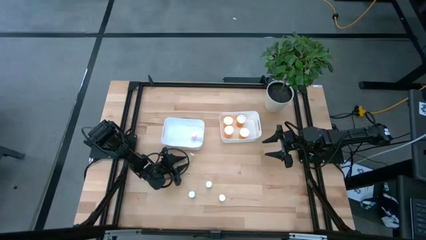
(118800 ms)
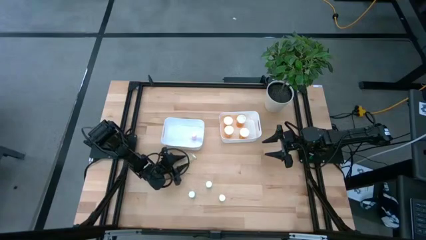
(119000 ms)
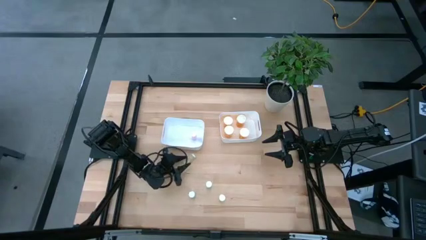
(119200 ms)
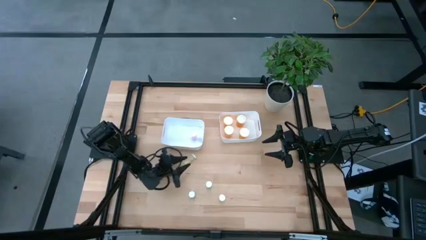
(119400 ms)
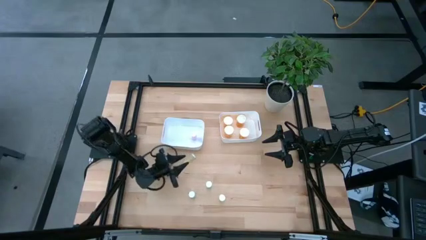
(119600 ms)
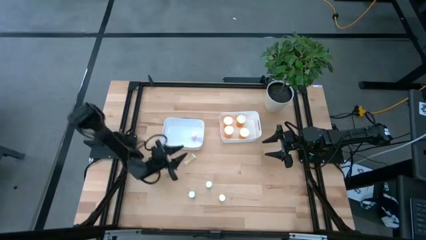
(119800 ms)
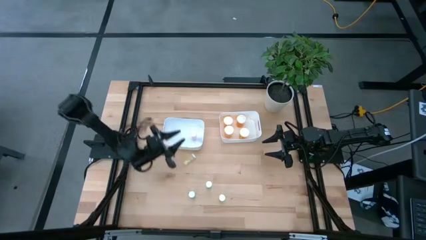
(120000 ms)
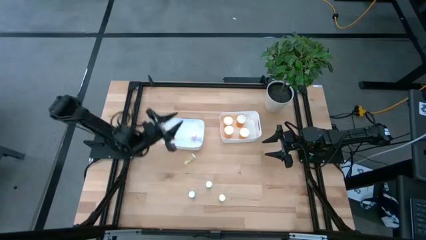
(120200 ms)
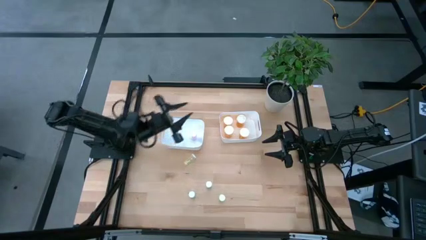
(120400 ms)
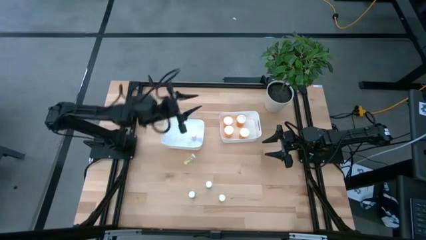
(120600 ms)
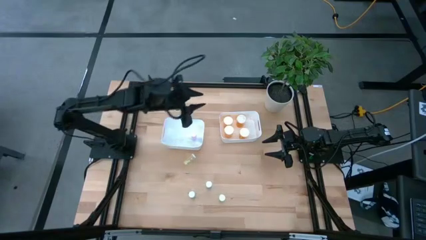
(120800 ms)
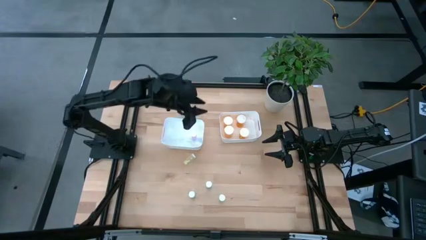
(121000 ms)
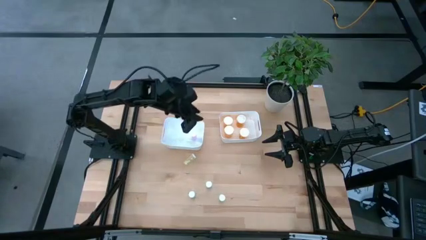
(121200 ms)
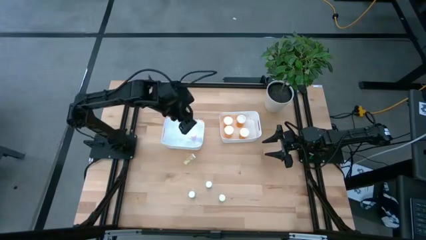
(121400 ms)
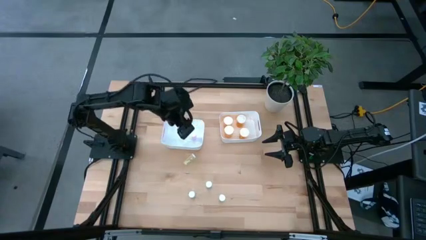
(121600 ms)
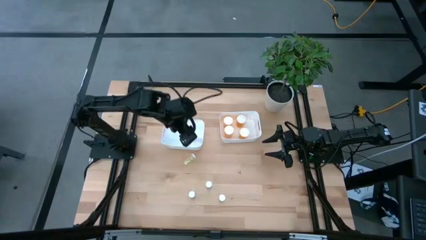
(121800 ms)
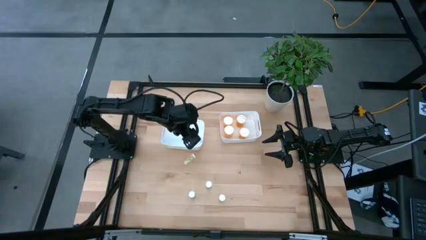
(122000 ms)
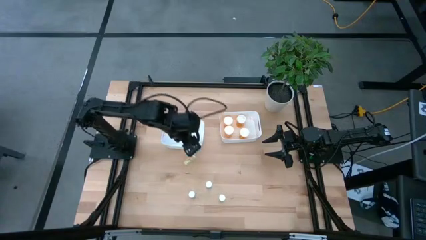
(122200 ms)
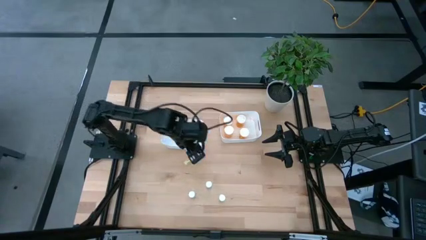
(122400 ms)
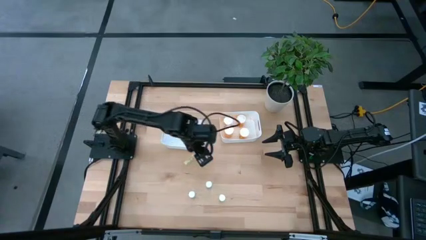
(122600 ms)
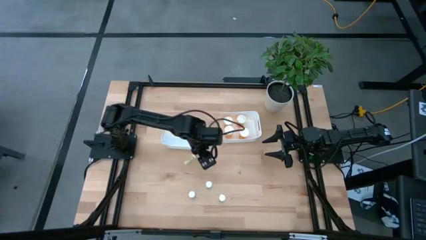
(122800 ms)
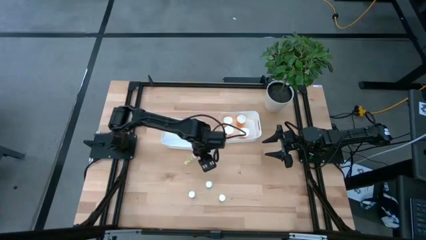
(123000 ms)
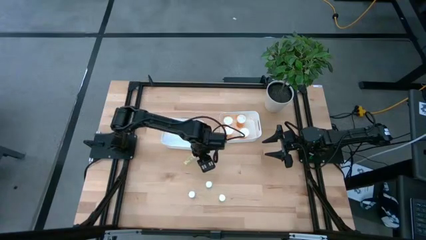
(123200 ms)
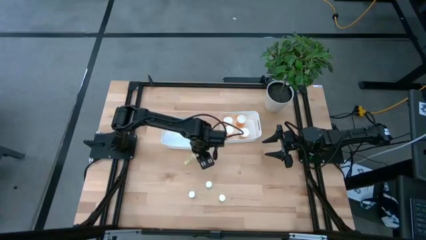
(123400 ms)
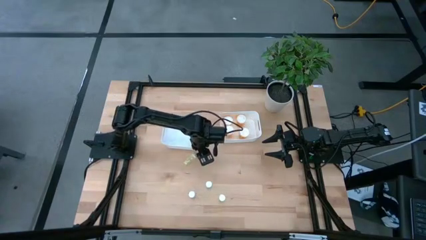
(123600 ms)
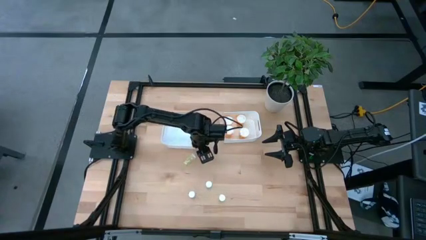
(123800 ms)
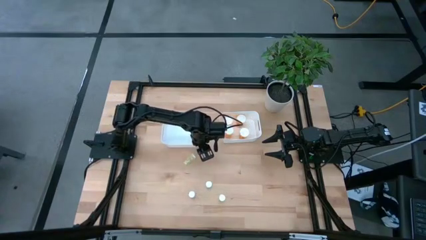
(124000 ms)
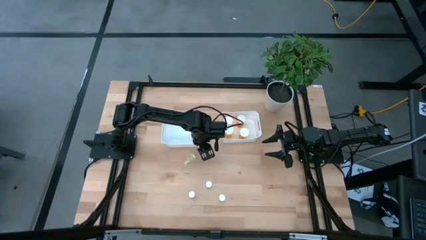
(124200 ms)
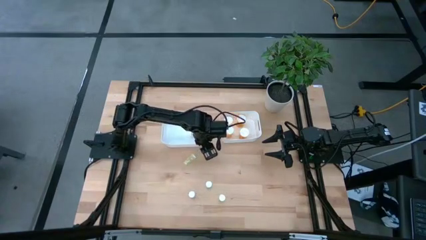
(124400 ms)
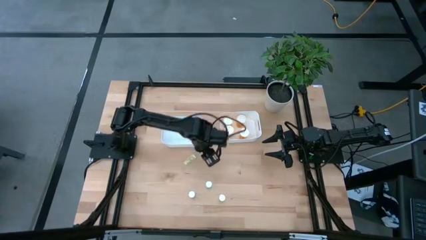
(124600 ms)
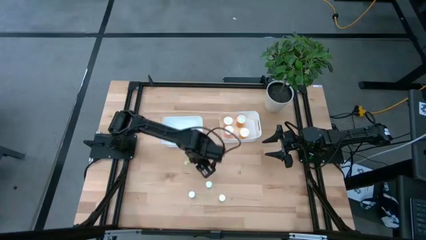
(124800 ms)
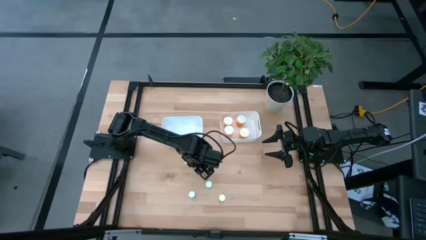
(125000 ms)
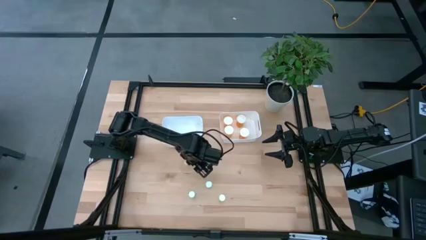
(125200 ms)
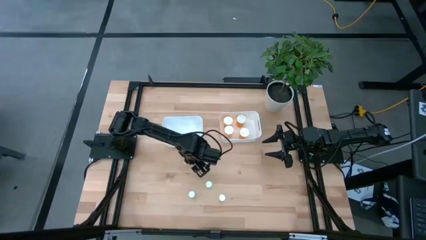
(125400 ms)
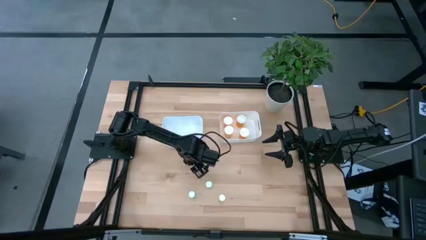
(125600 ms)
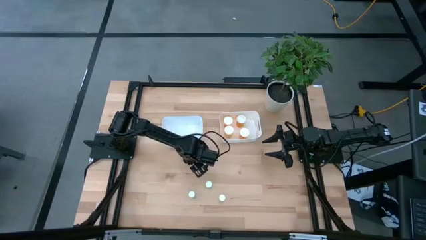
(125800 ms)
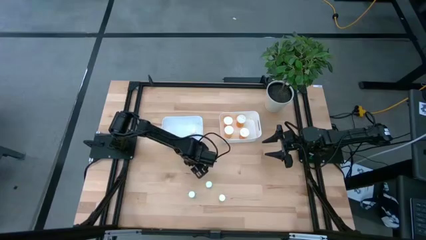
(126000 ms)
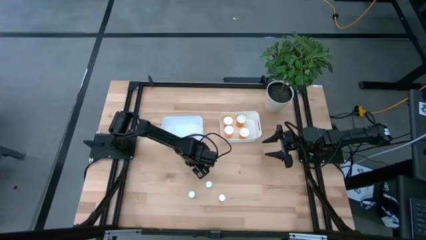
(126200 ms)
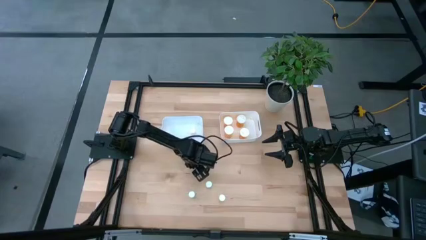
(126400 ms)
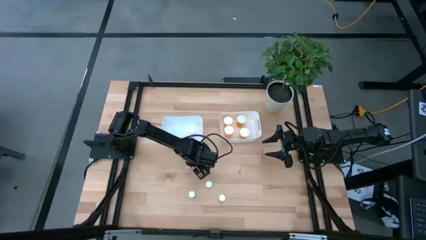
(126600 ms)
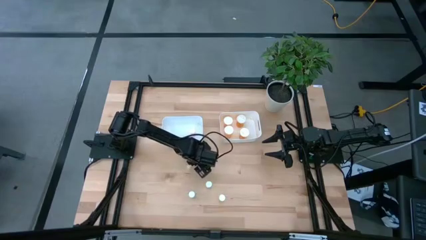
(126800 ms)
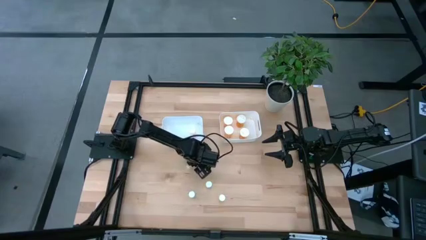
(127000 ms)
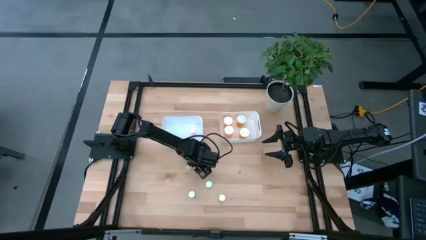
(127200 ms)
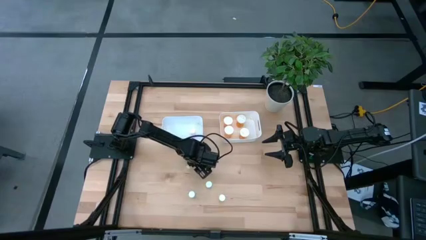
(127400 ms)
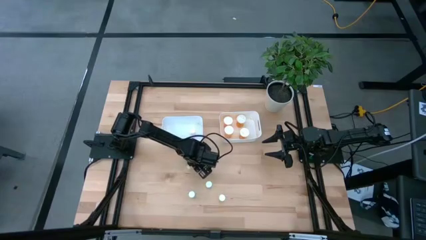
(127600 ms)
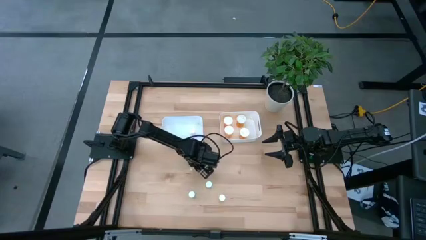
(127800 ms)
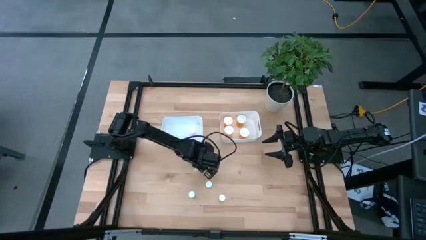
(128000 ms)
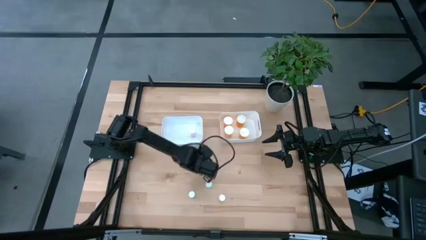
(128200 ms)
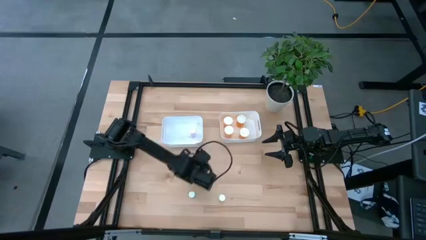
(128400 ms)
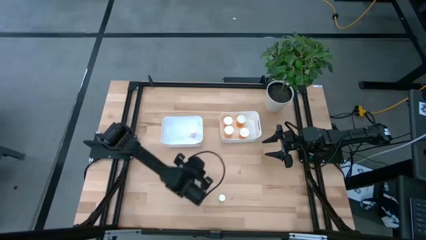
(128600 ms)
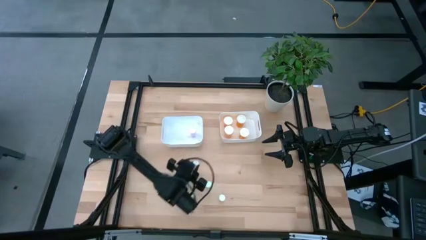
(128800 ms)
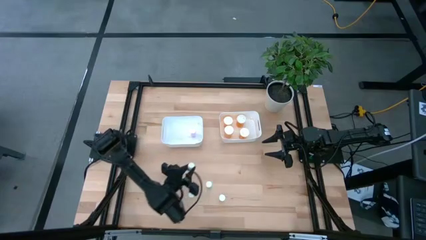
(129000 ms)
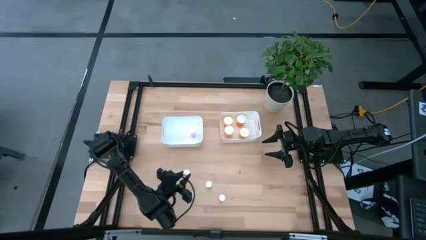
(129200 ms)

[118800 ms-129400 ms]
Task: Pick and place medicine bottles into bin by pill shape (circle, oval)
Put the top yellow pill bottle into the left white bin

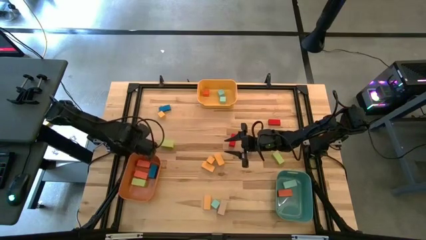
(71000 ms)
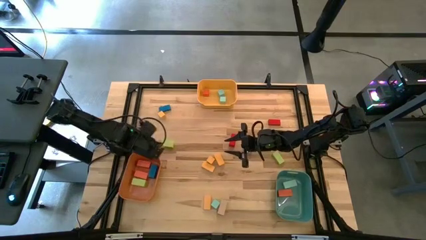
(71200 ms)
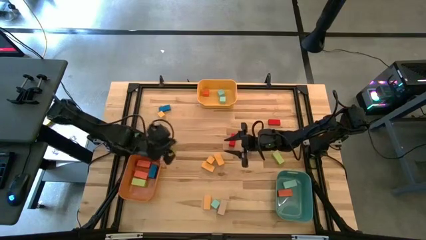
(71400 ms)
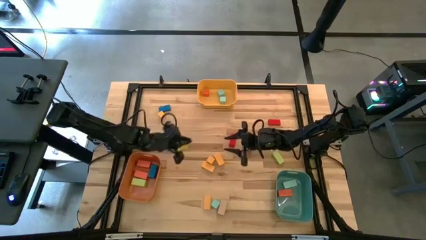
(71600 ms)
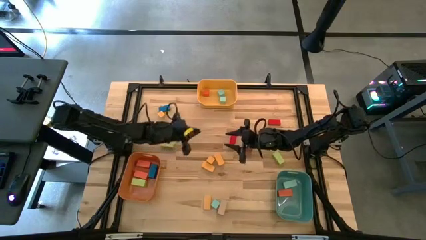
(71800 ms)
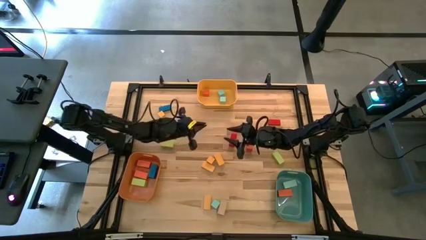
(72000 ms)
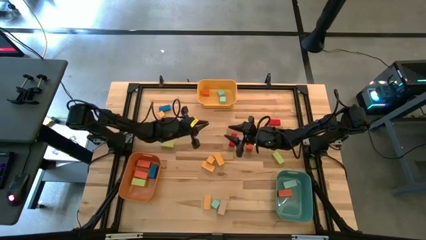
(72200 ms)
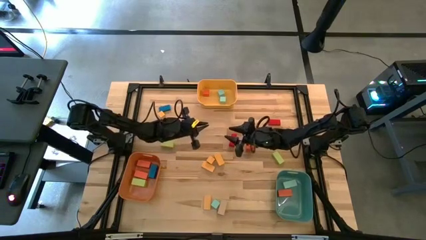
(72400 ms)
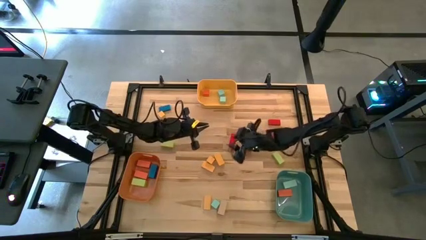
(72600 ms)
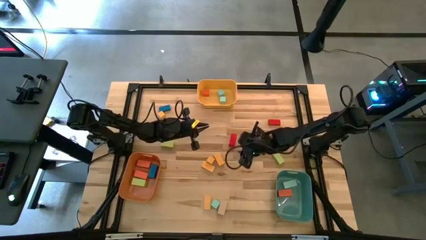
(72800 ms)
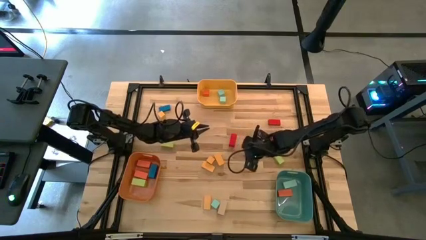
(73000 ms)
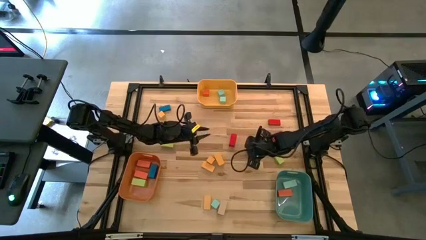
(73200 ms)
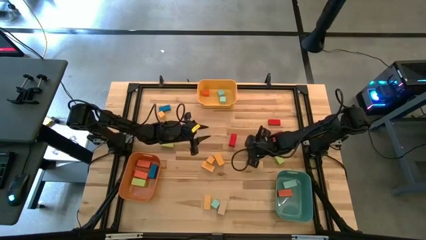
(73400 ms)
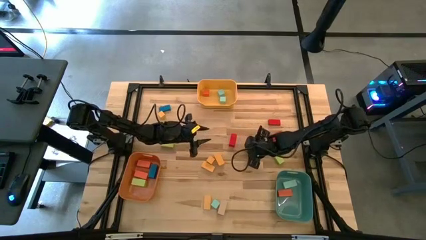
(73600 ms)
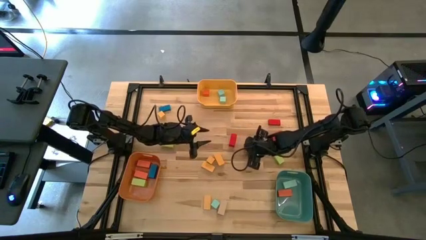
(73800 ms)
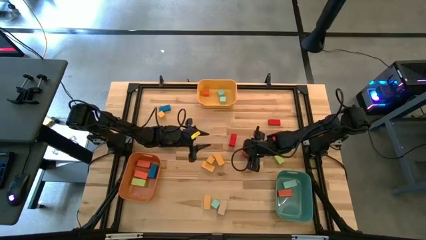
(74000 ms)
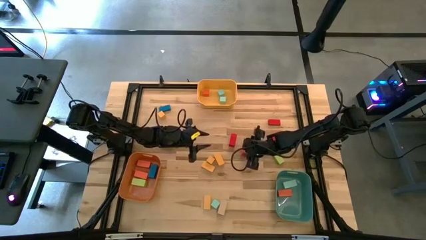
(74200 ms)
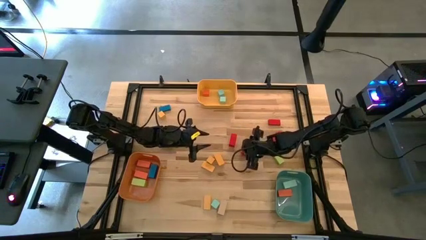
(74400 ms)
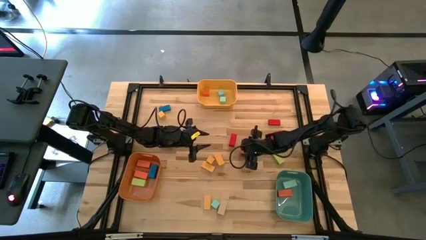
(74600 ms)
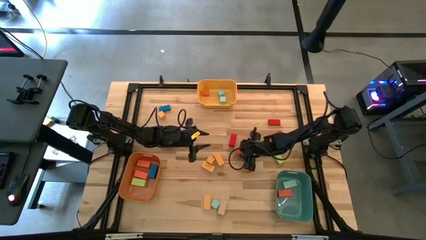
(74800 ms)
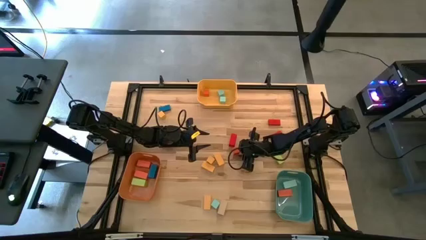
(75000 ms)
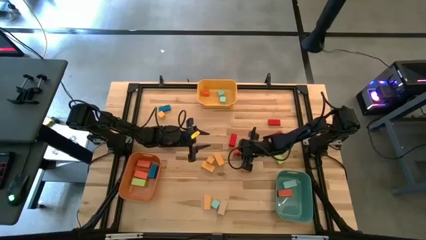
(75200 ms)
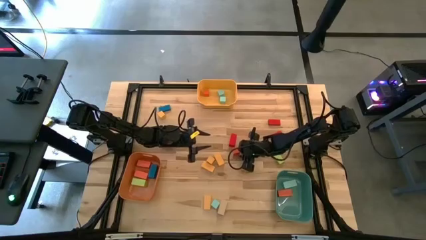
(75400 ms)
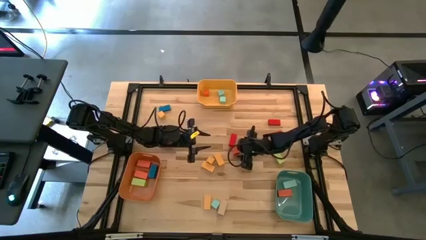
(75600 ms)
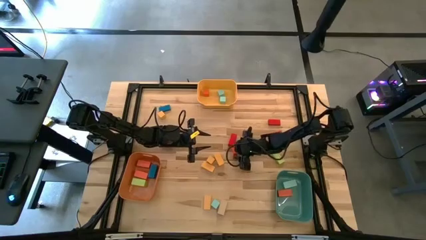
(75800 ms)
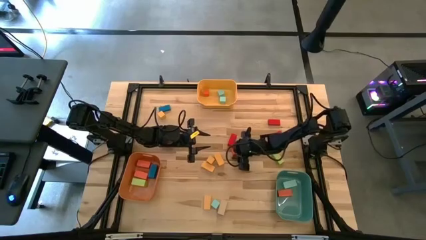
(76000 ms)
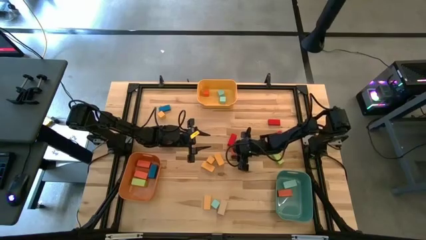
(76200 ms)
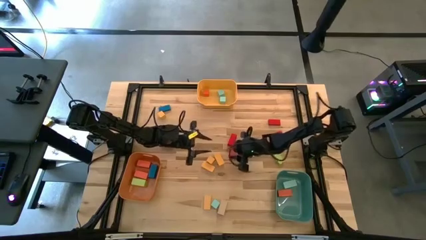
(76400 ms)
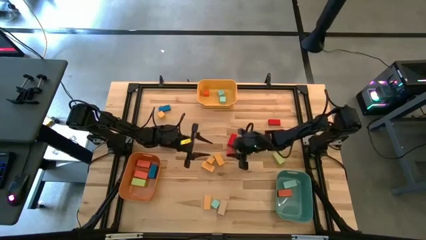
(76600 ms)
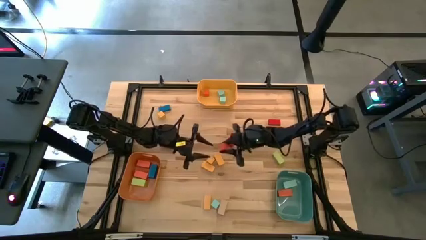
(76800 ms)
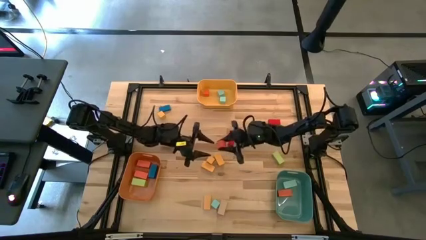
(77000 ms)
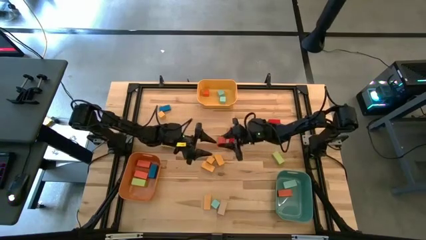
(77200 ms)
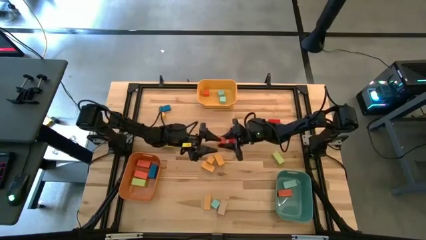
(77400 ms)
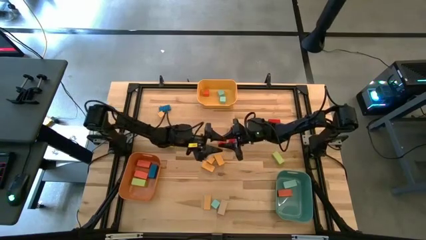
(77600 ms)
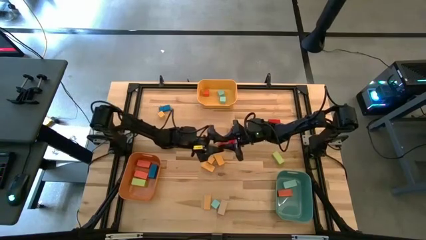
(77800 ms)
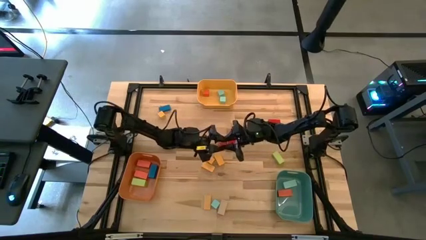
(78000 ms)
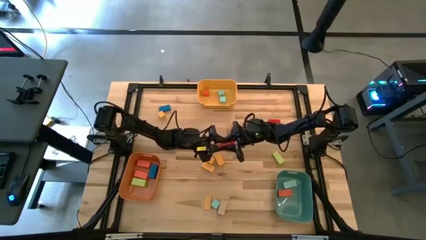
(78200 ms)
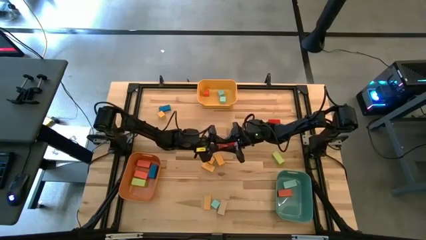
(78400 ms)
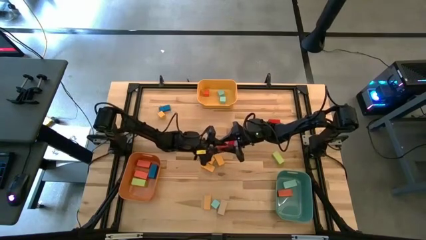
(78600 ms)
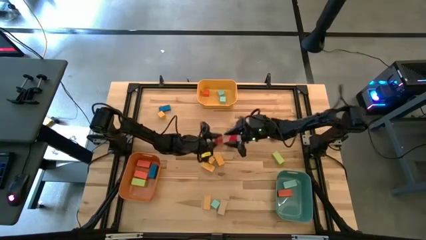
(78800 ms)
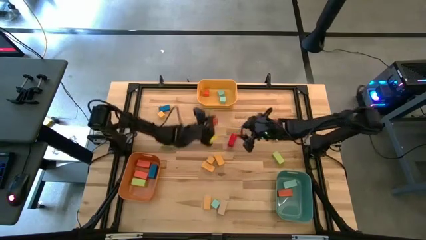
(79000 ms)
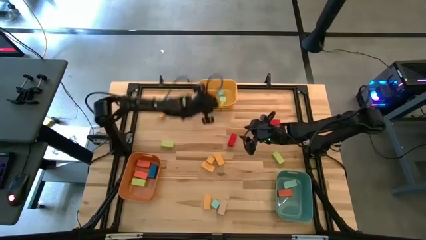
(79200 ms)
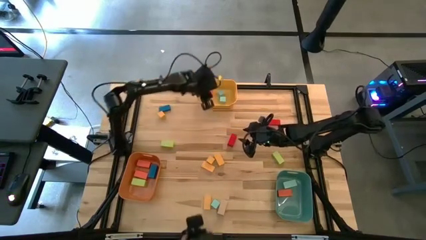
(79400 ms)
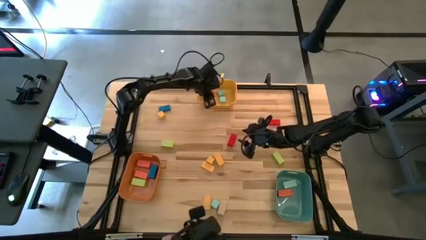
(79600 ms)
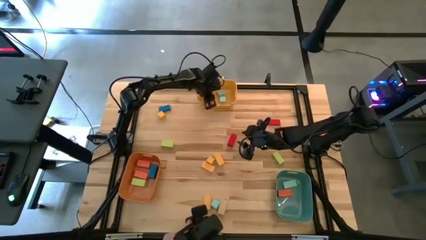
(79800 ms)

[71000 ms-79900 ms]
Task: Sort blocks by size
Put the small orange block into the yellow bin
